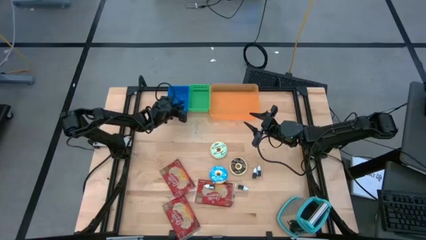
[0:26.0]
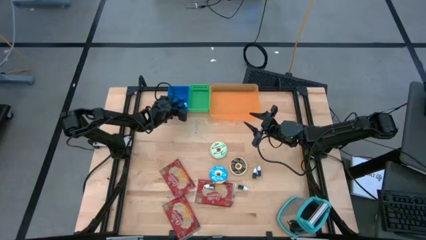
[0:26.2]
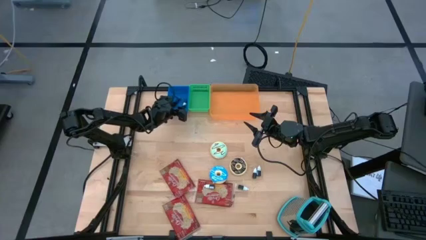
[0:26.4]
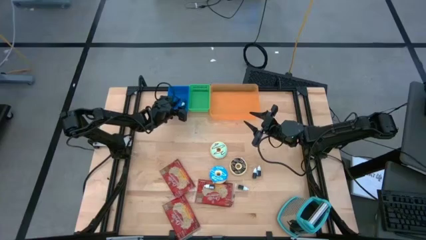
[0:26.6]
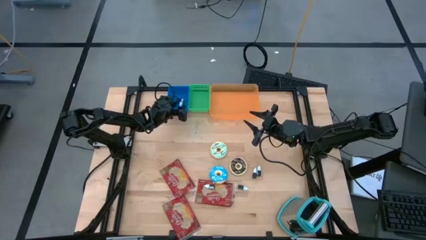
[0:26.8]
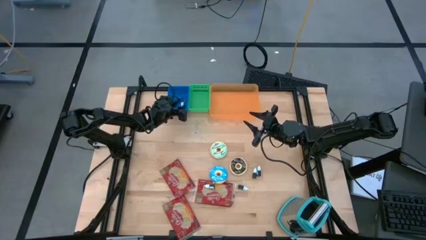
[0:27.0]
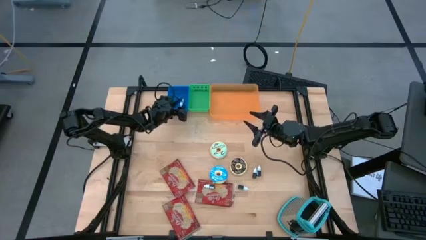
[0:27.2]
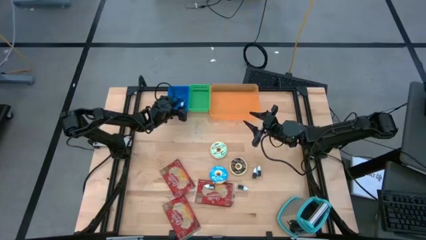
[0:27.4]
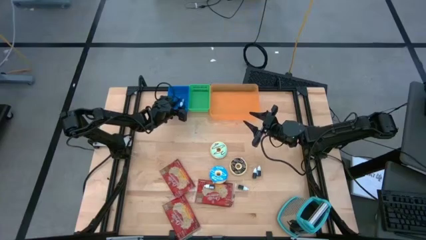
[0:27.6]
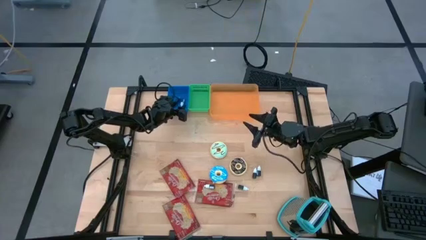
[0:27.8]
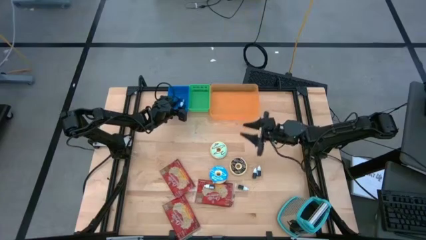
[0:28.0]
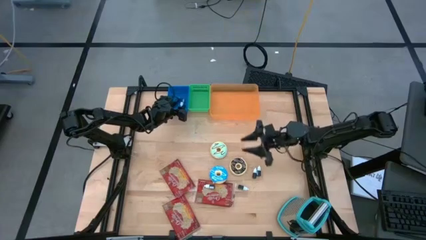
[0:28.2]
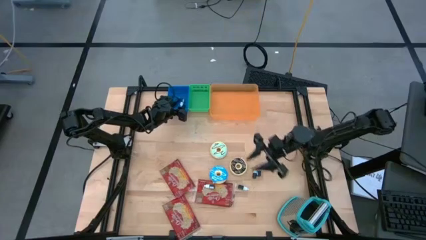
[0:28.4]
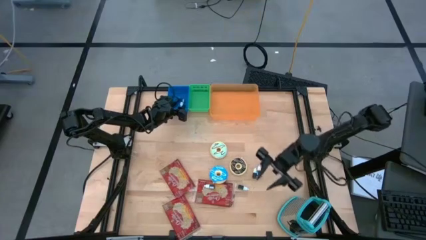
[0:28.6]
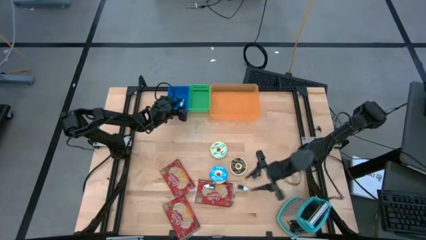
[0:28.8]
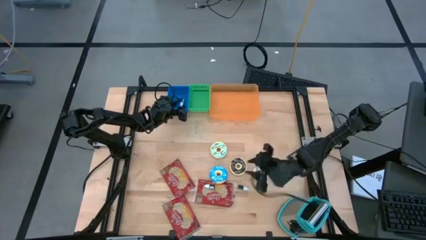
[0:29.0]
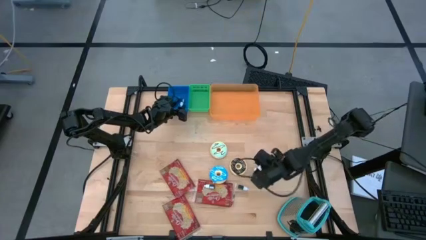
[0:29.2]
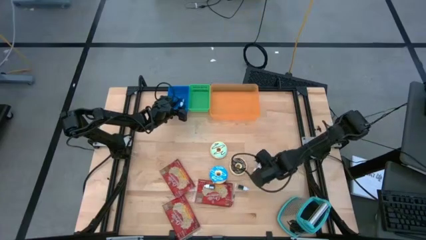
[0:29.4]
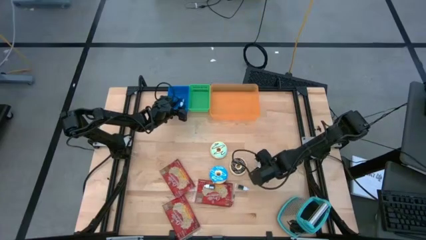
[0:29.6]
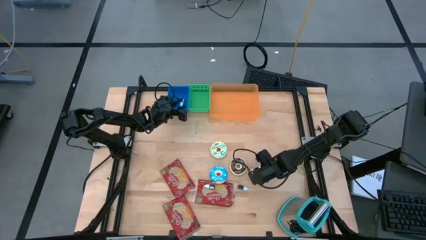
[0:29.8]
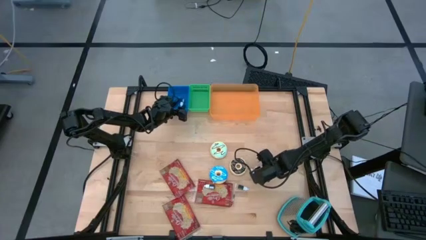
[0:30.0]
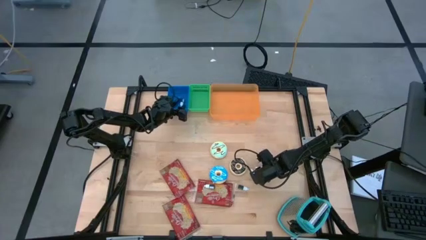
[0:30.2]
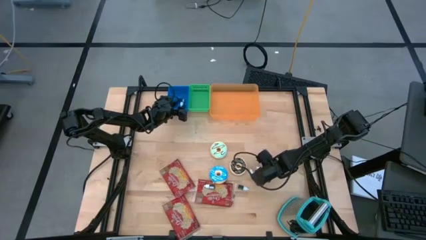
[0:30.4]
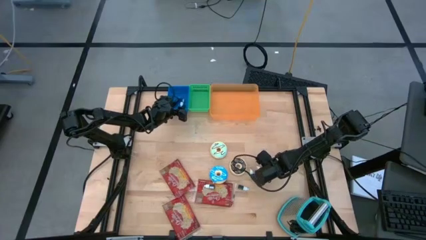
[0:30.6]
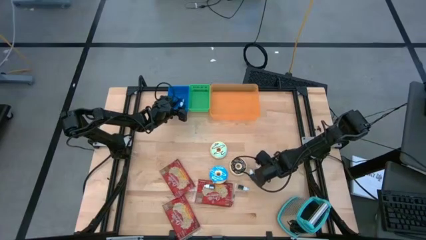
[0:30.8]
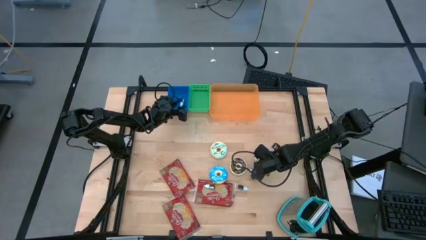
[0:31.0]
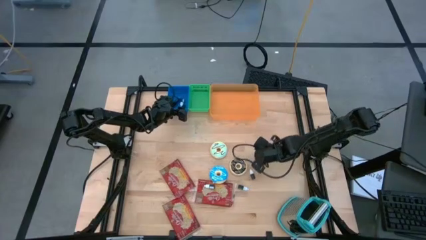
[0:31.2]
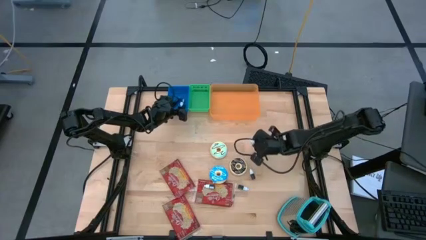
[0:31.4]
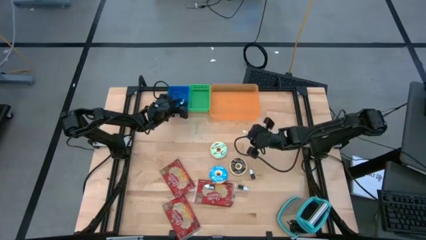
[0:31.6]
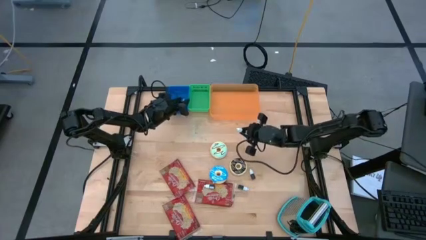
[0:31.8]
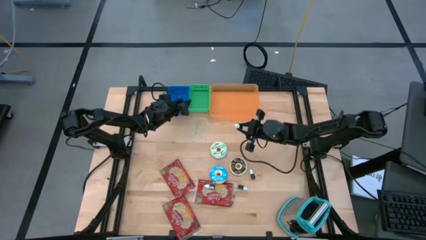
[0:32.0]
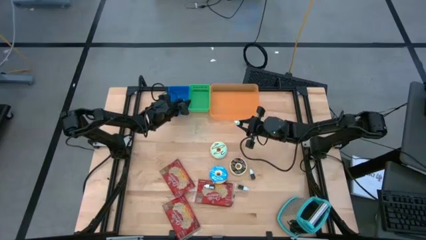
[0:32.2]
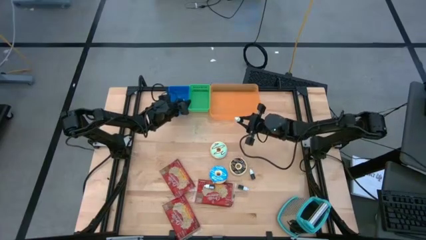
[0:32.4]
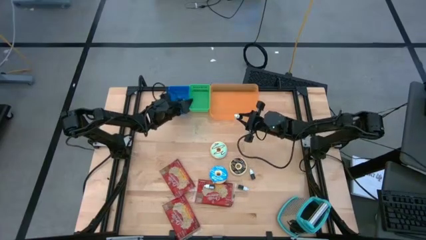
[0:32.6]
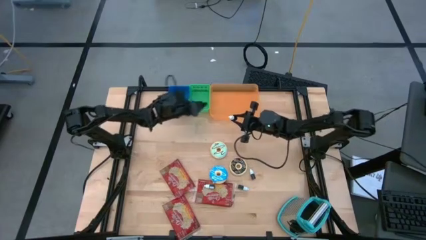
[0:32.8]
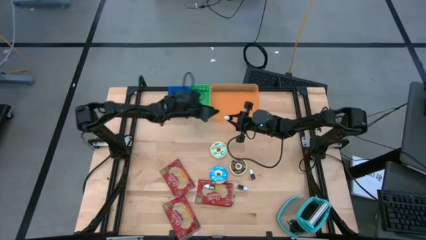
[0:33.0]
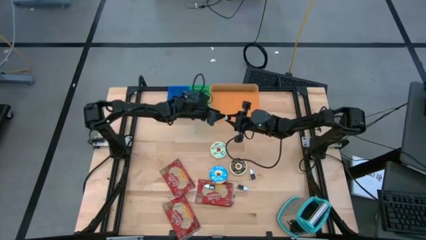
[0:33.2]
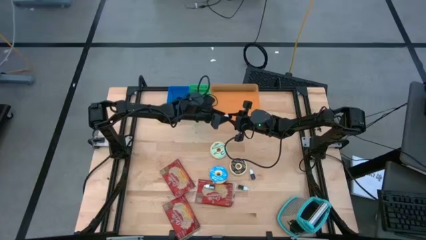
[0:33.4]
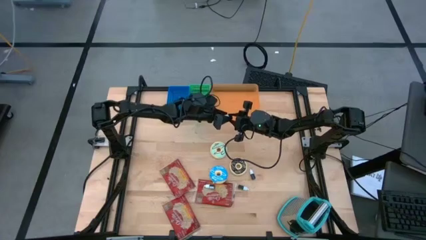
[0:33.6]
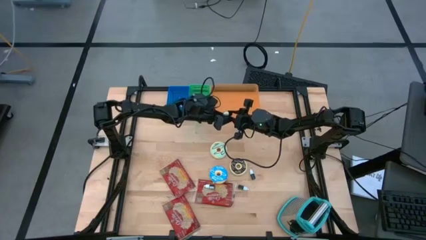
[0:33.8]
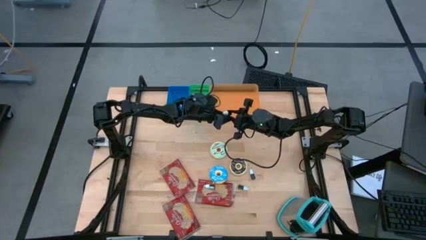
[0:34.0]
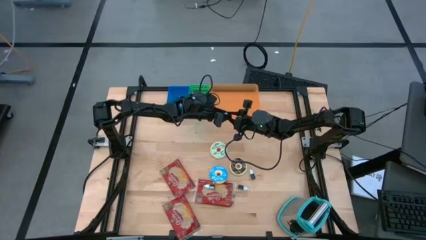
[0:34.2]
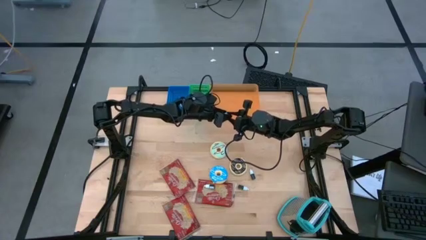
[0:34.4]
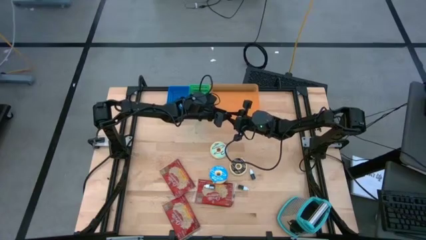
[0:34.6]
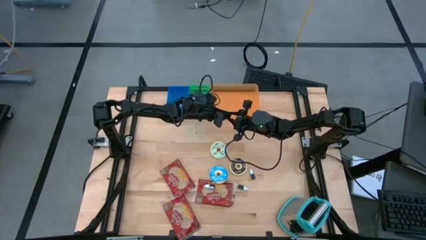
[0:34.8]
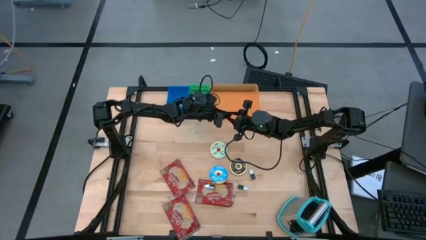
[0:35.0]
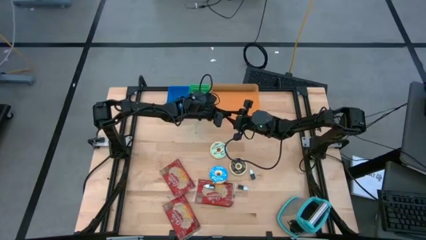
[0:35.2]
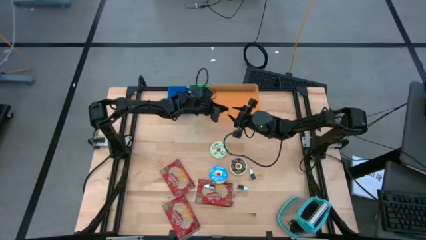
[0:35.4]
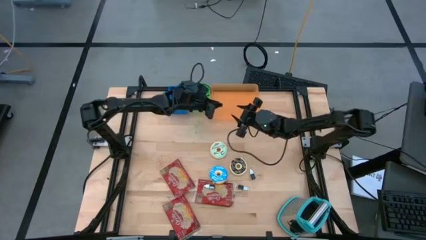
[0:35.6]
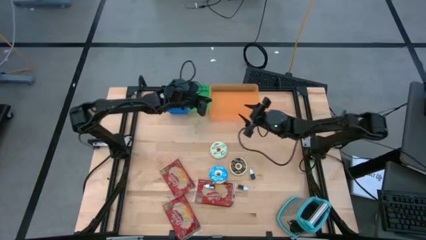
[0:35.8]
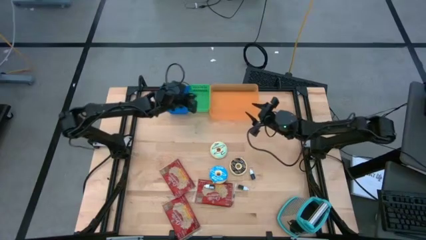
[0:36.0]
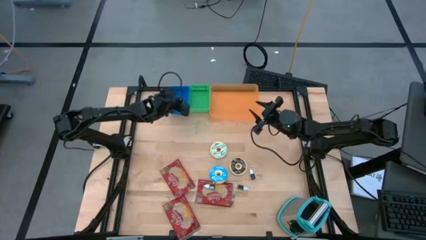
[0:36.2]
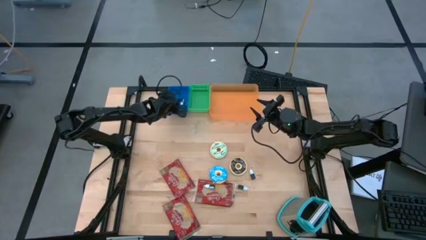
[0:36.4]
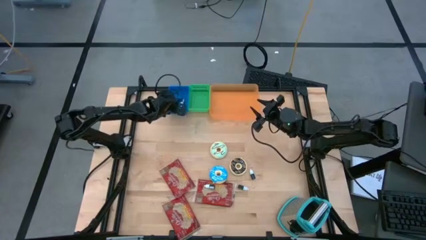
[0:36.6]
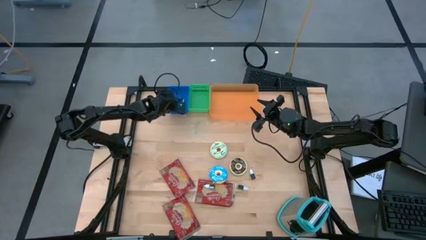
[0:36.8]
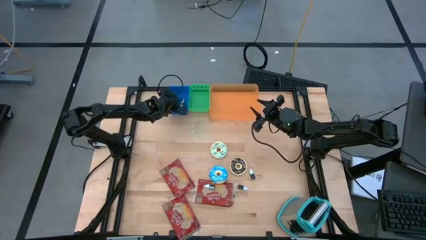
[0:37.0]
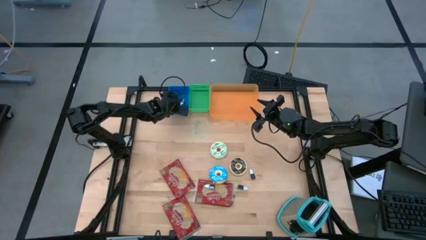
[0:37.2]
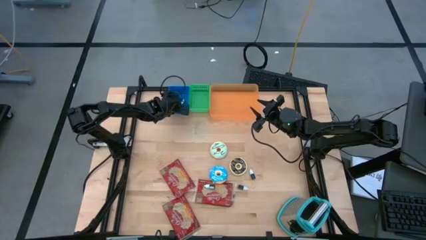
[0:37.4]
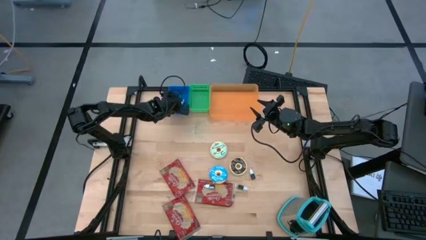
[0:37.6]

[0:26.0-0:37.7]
Put the light blue food coloring bottle into the blue bin
